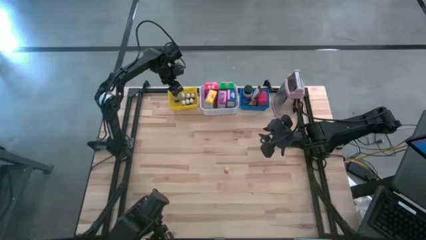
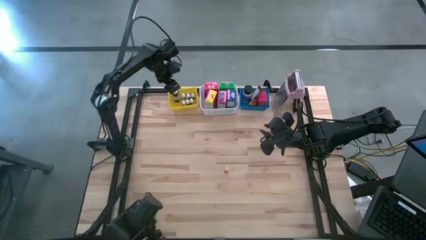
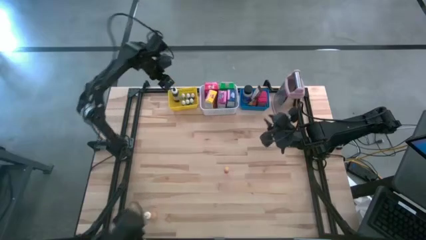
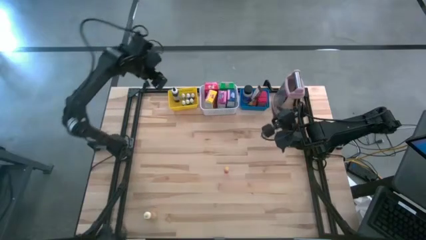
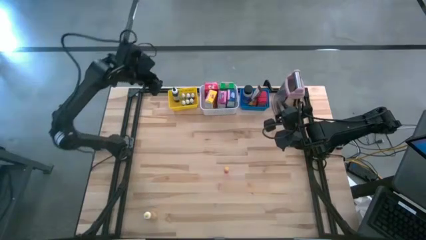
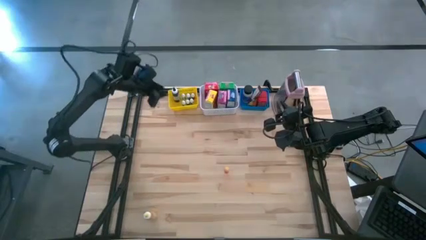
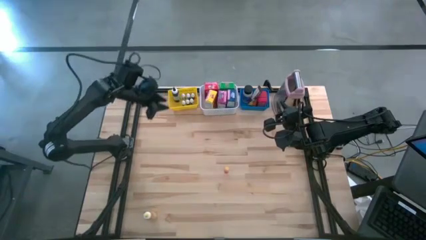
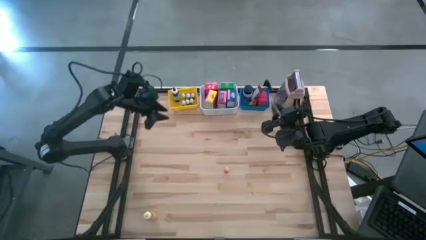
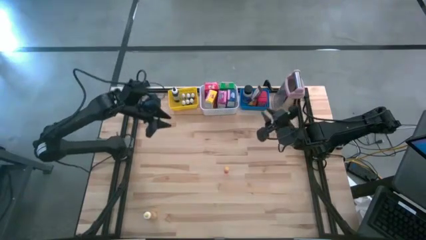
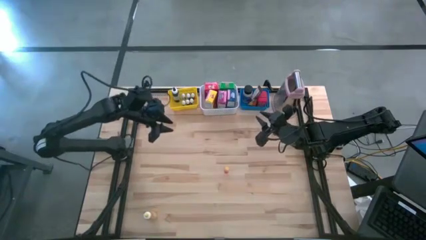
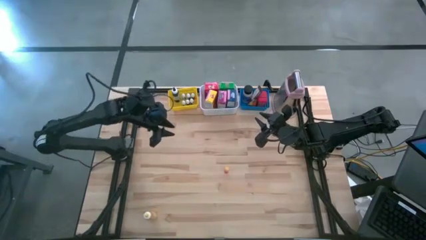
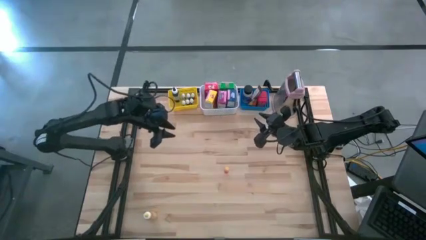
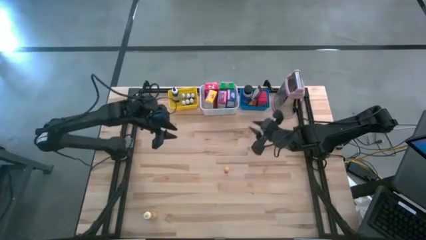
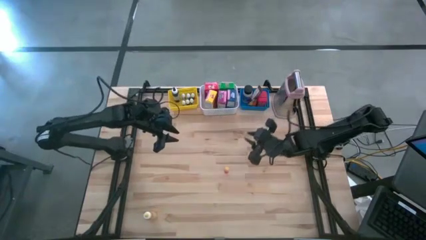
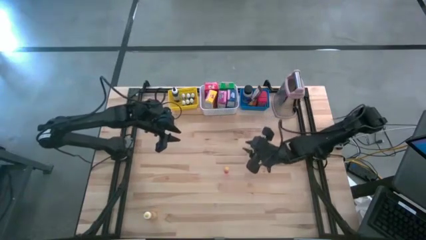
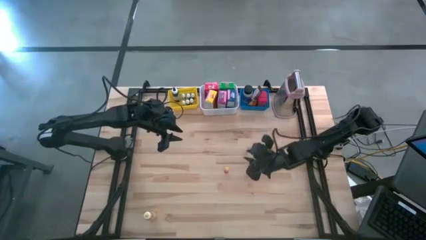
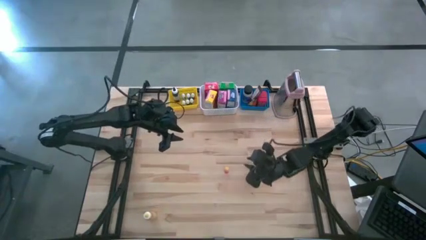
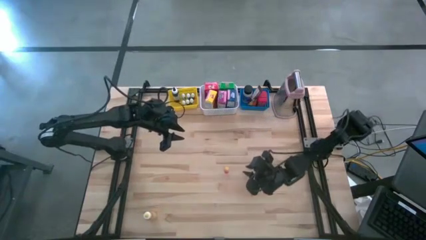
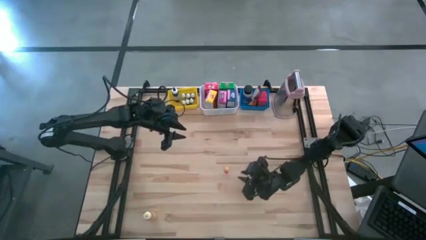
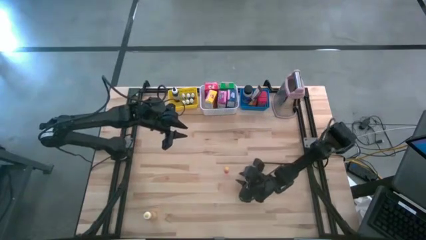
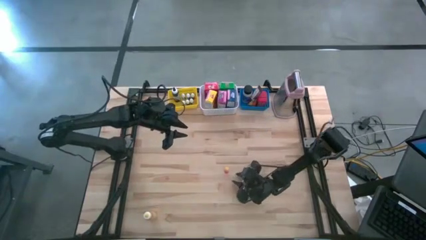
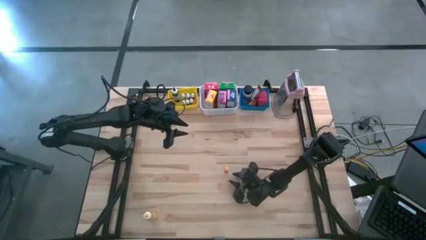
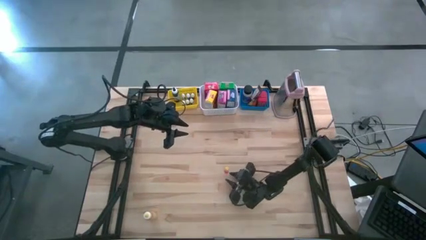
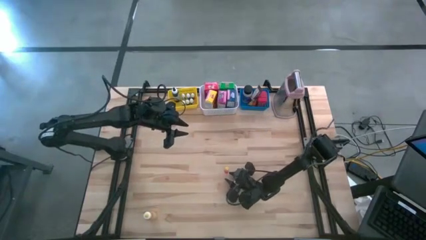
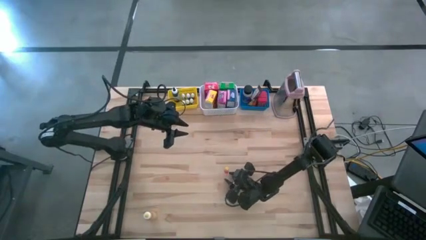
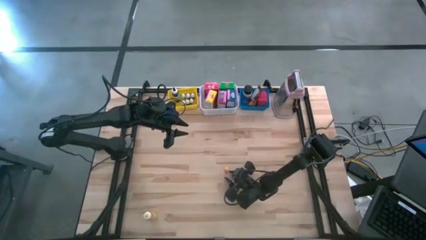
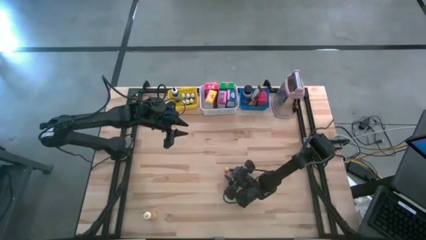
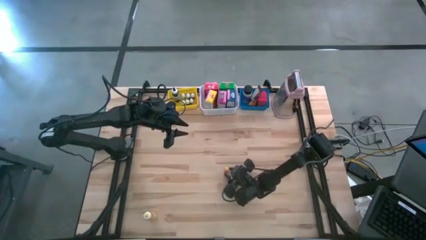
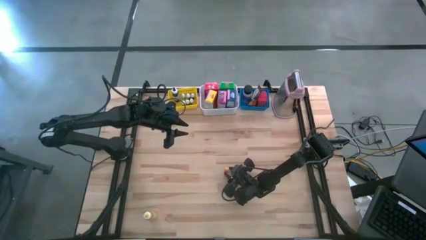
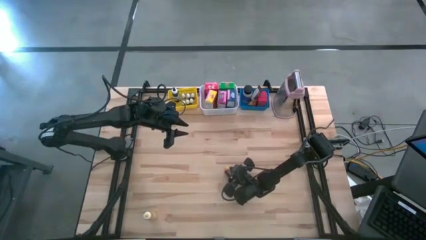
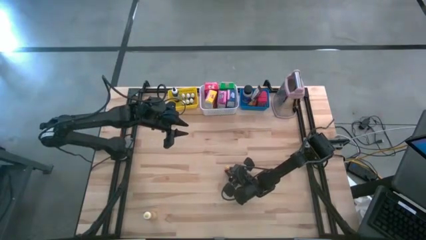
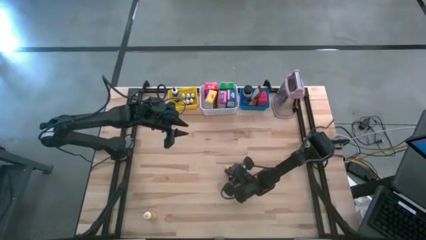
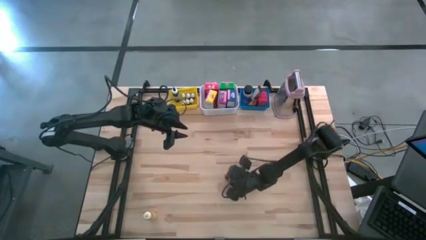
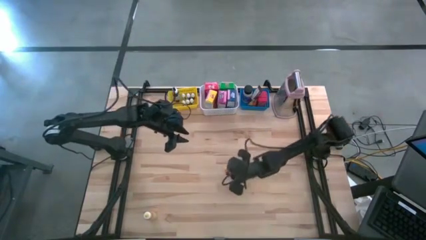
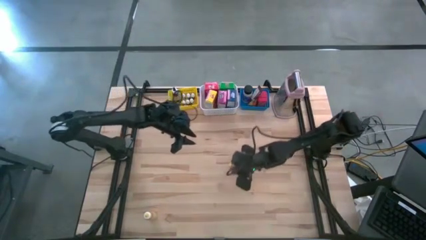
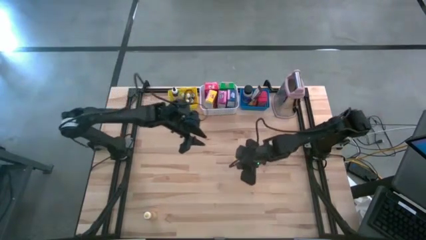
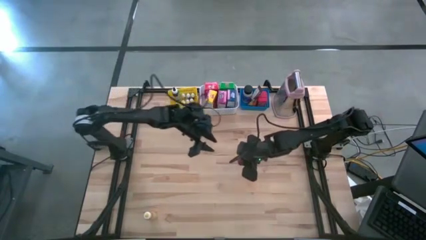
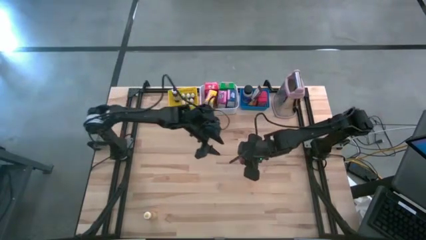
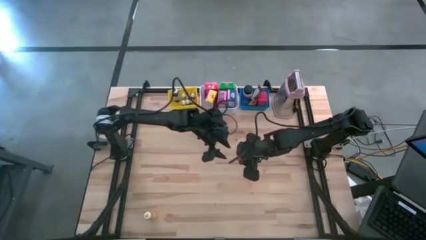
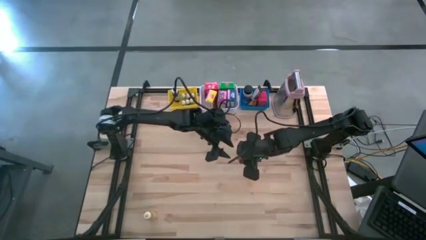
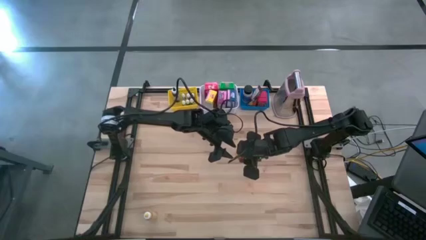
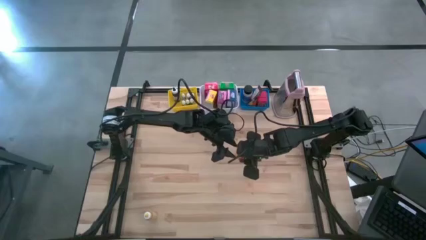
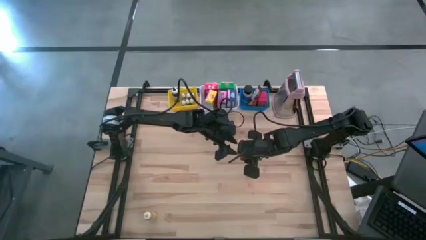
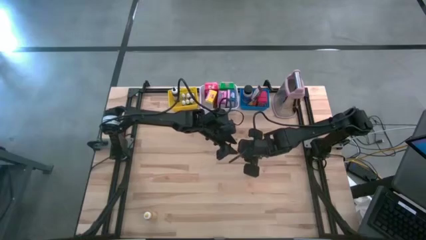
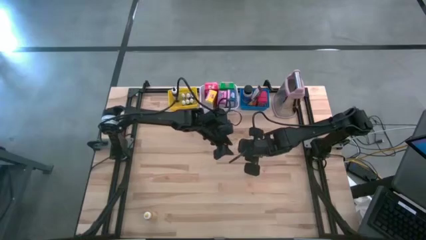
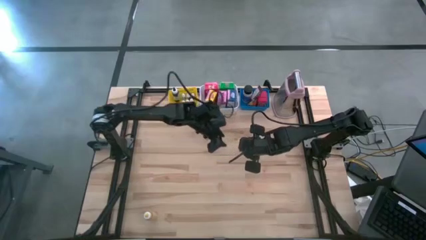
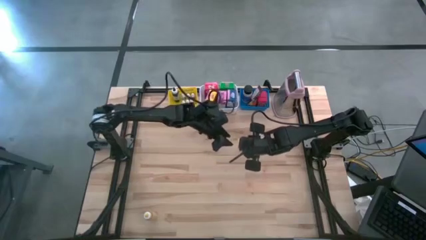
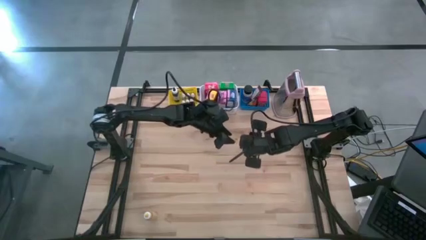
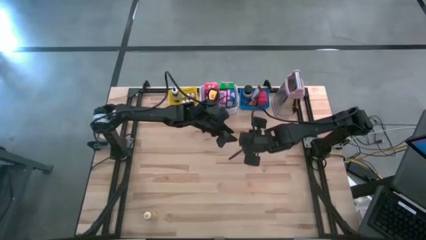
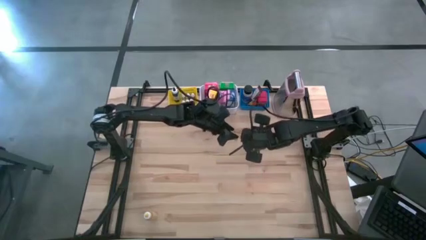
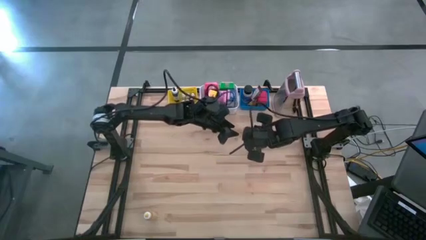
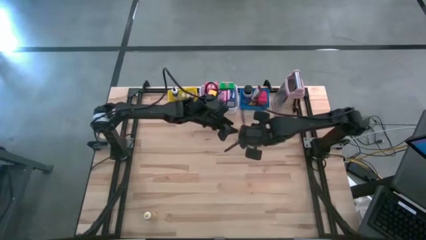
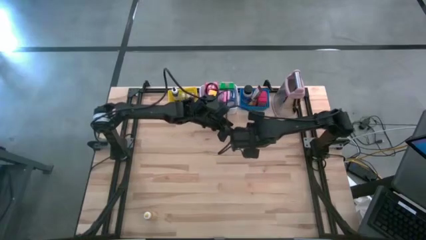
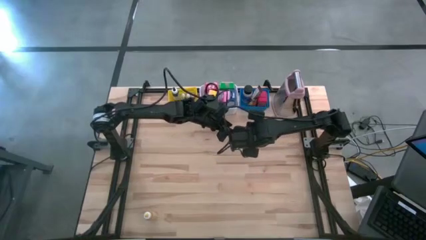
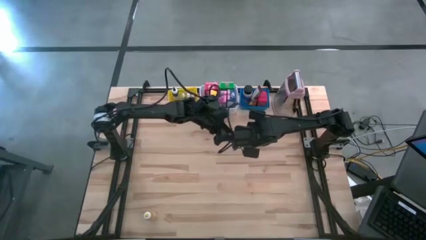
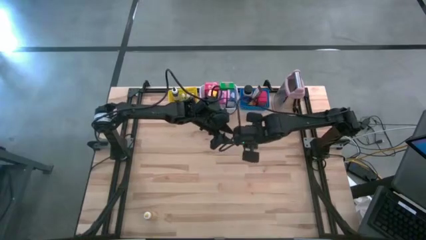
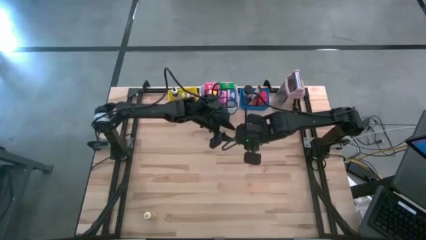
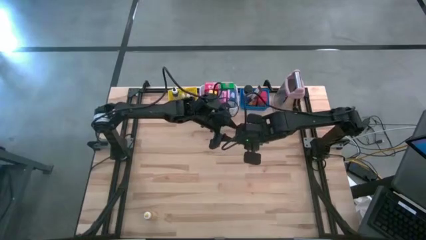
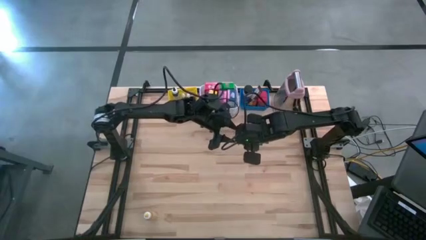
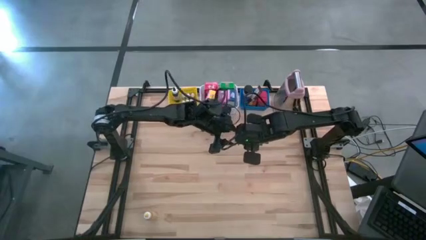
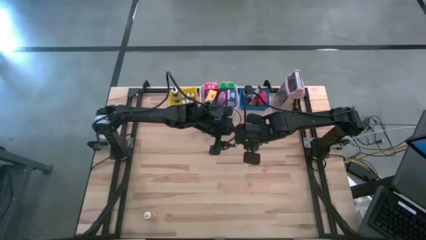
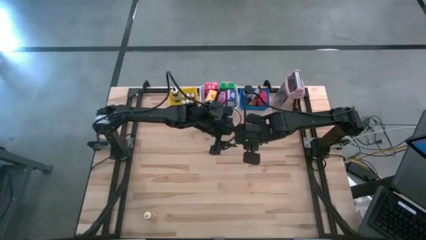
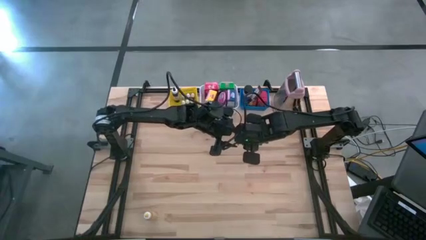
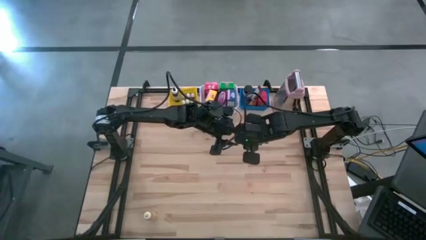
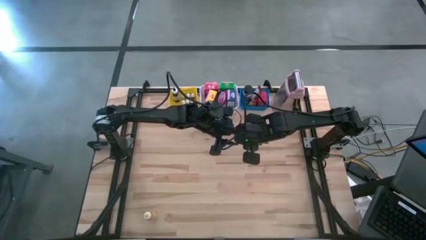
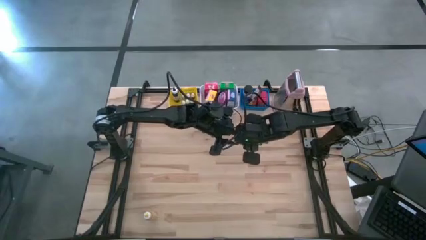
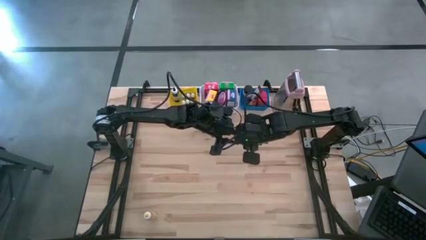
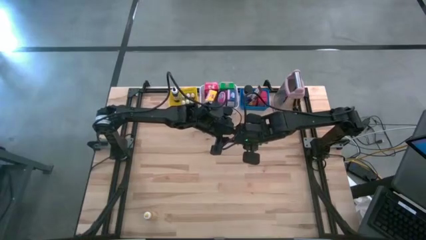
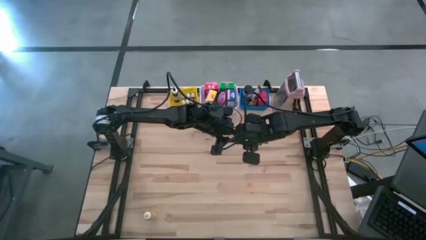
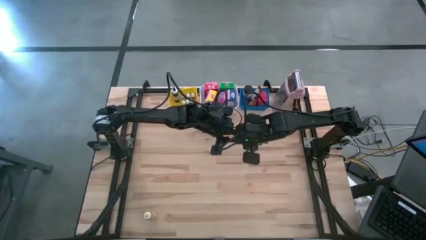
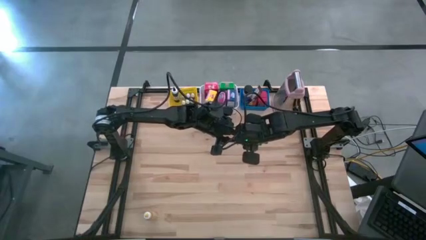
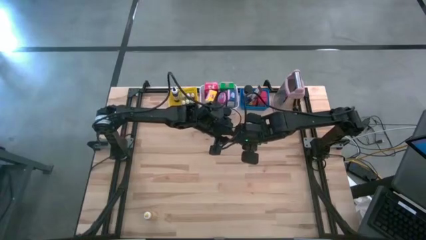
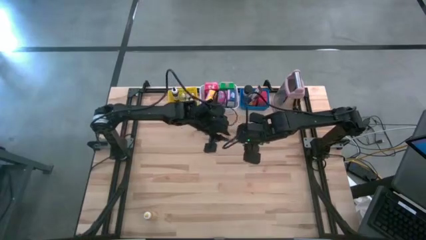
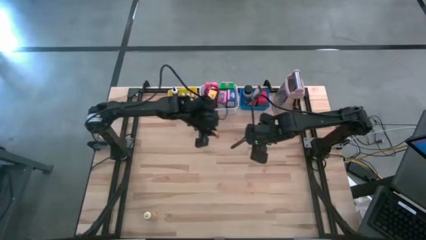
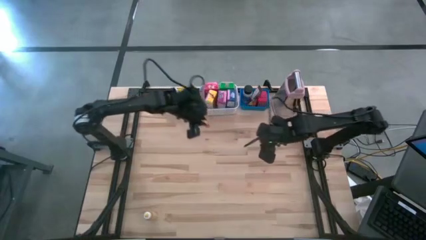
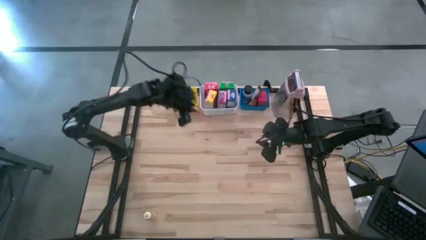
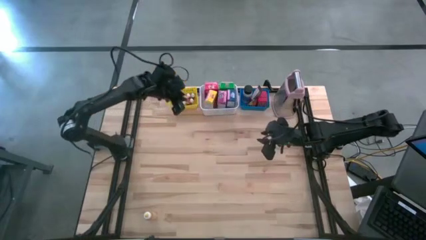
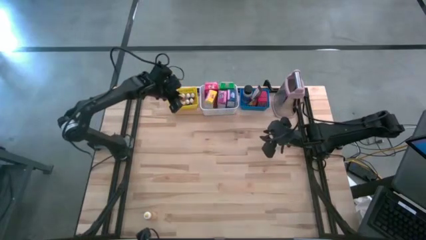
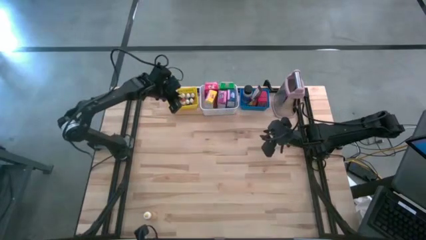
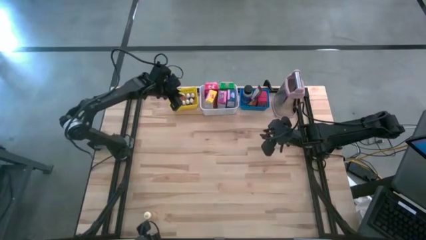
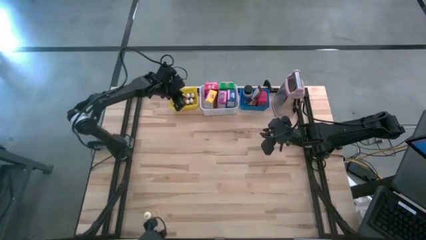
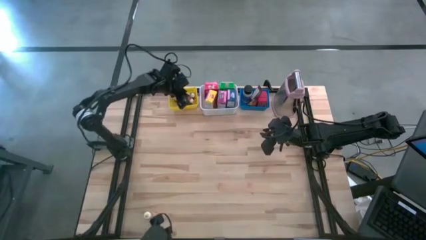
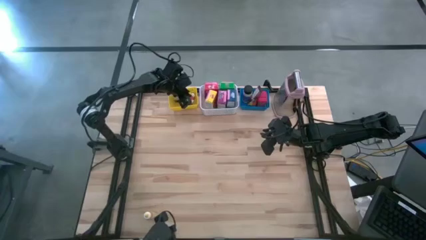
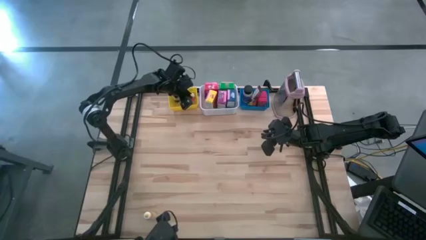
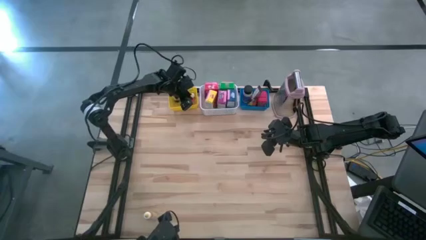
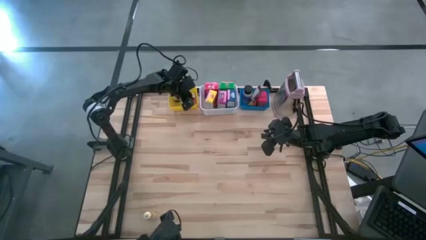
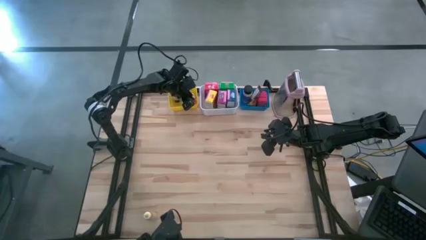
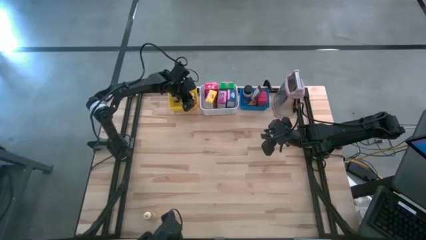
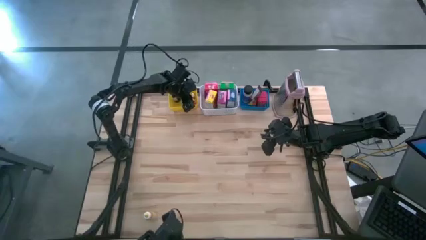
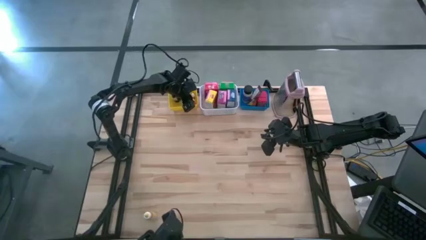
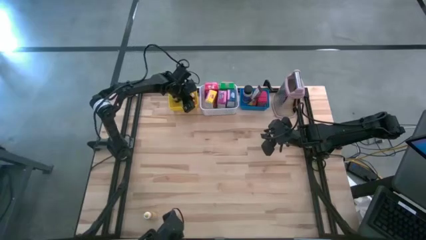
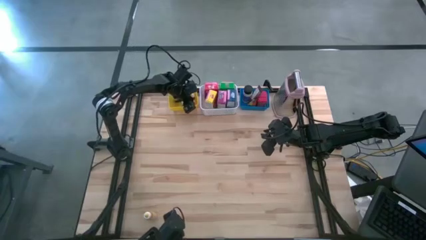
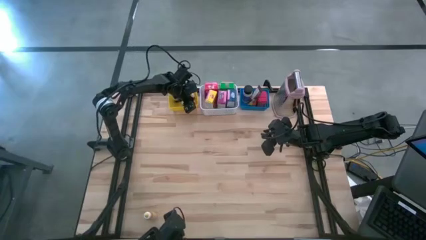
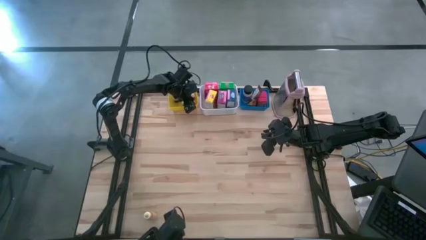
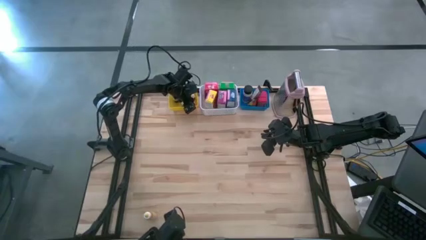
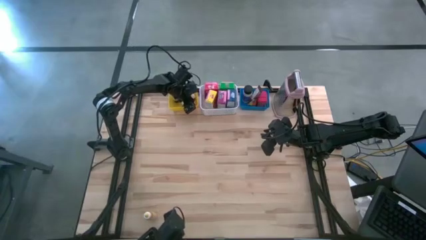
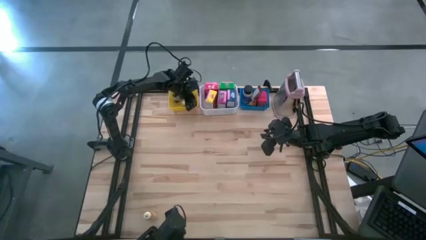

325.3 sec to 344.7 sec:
Task: Pick & Place Kitchen Items
Put the yellow food coloring bottle into the yellow basket
